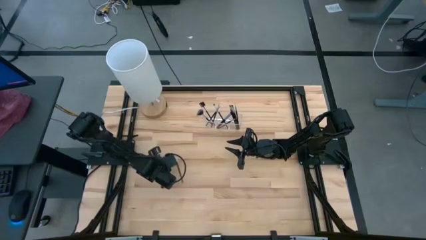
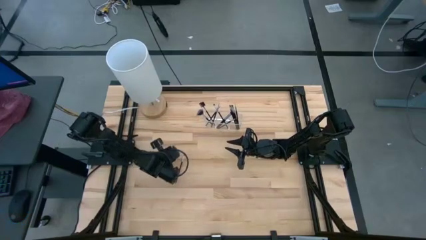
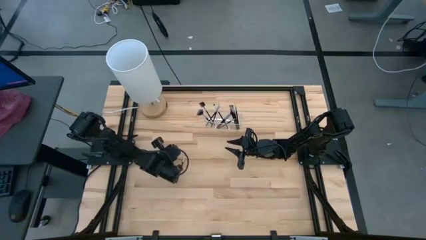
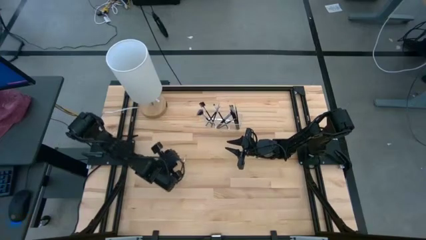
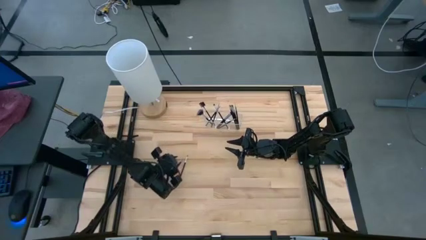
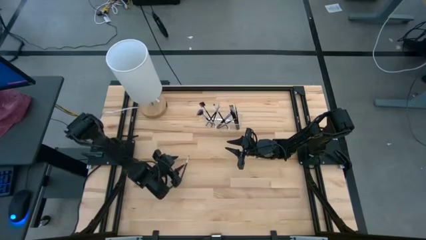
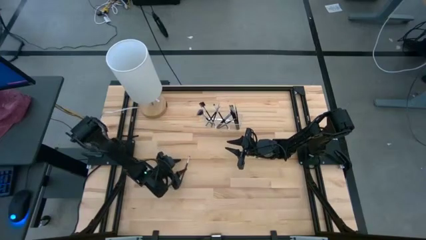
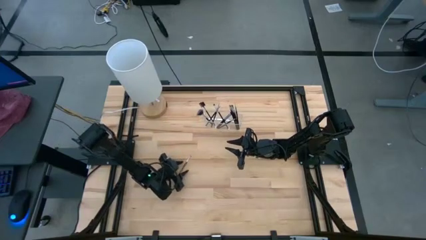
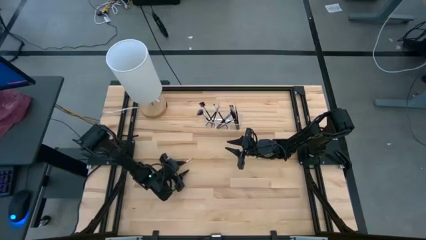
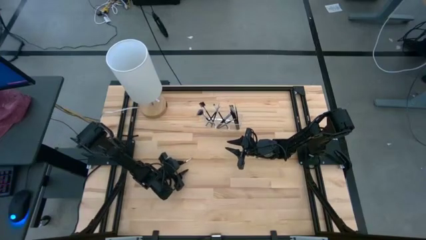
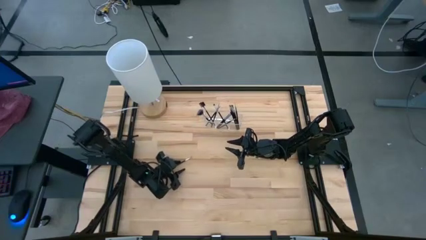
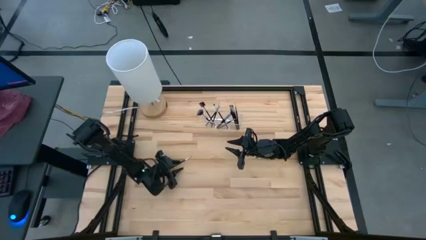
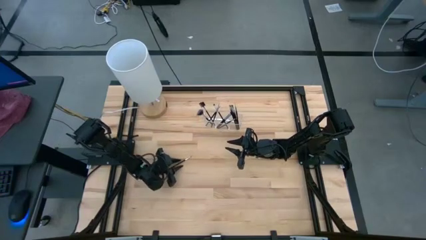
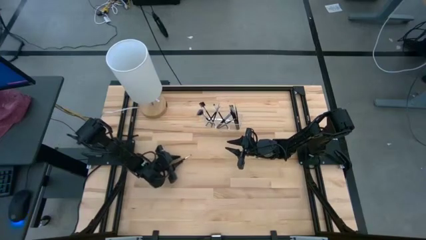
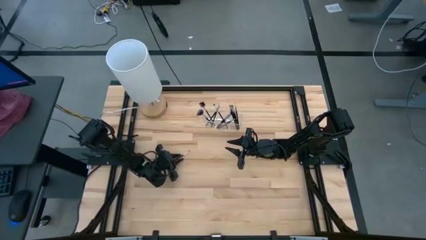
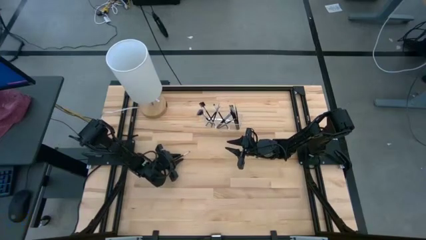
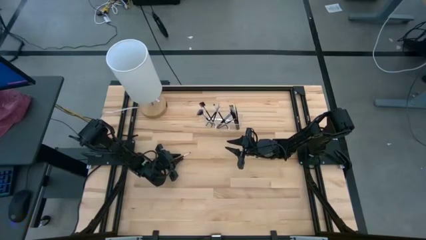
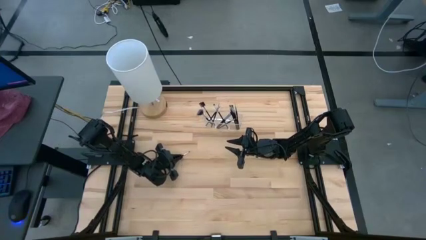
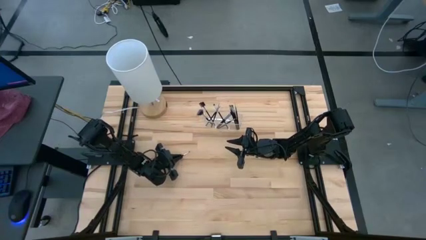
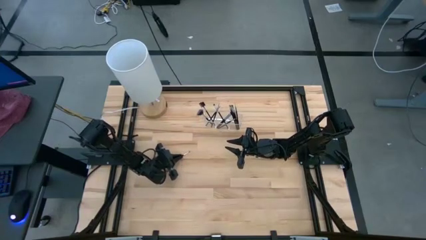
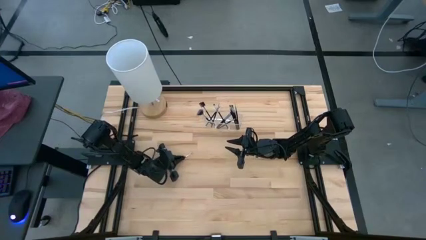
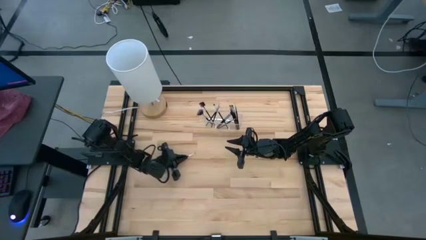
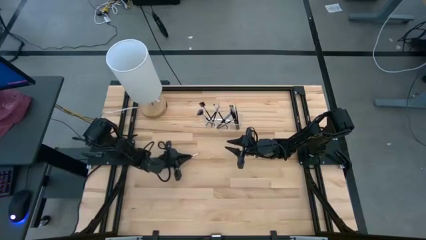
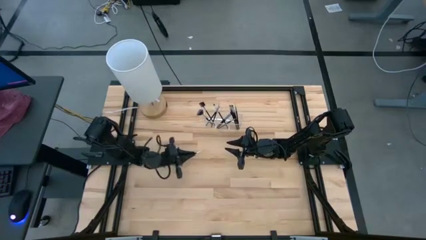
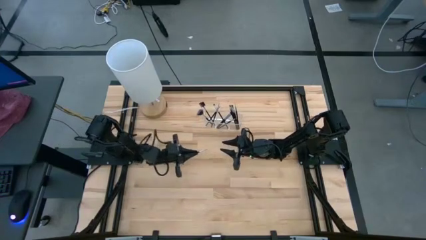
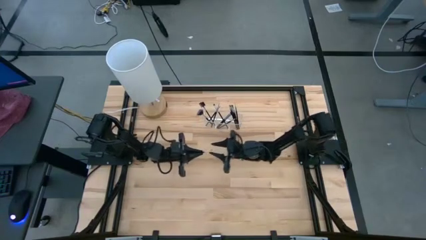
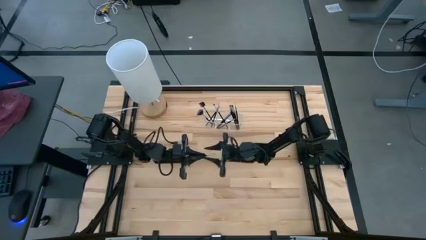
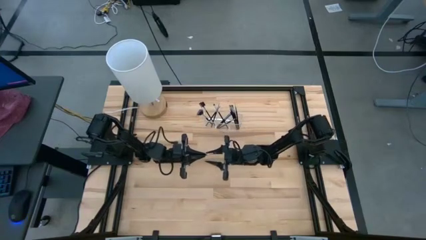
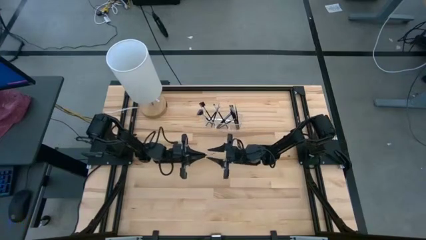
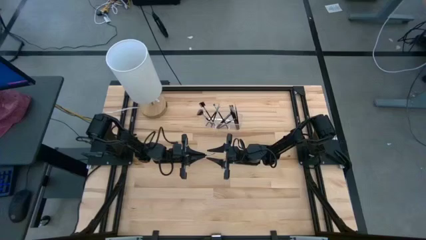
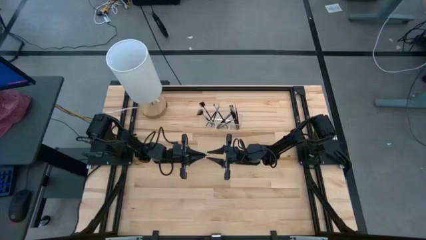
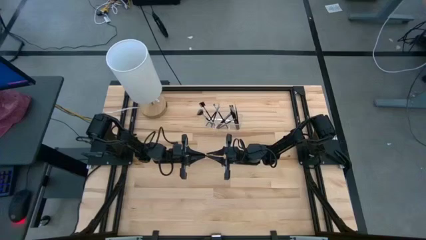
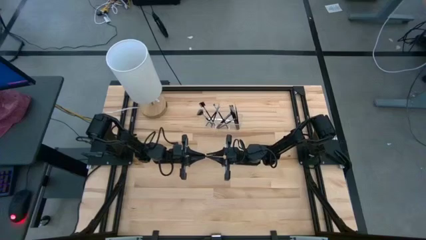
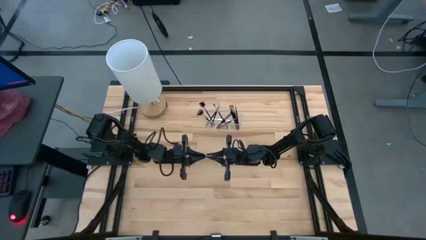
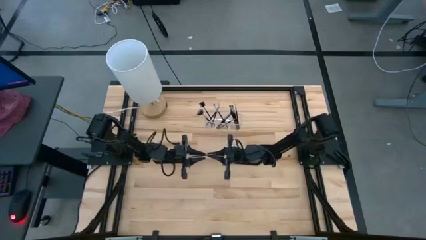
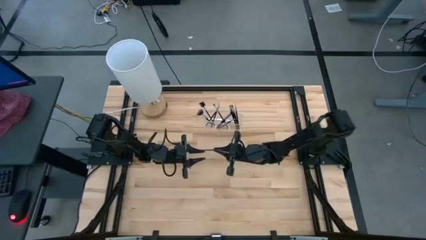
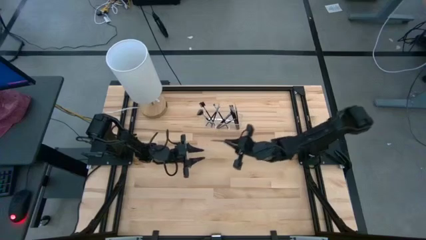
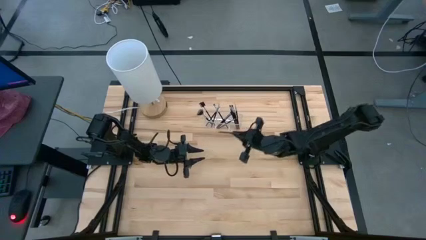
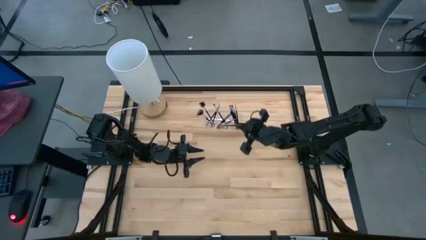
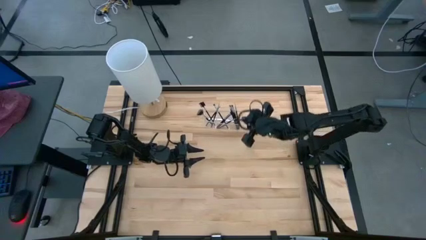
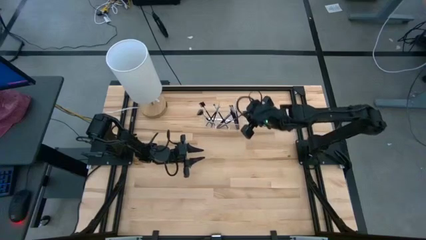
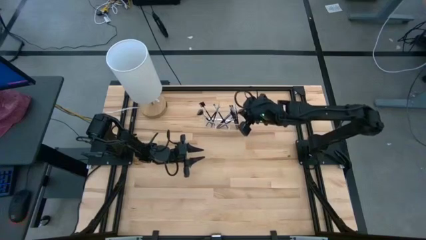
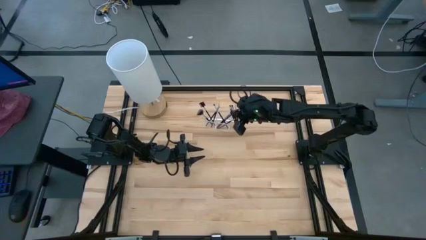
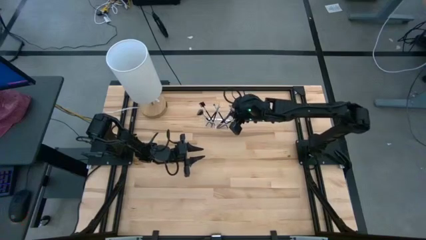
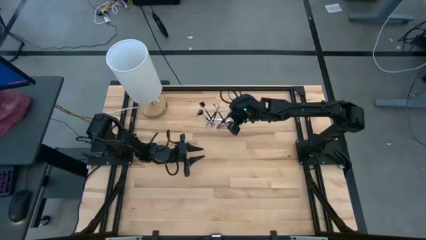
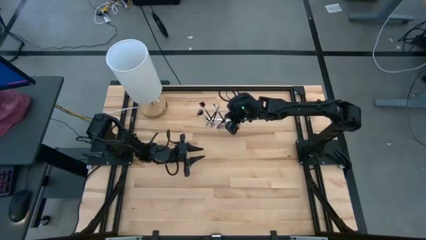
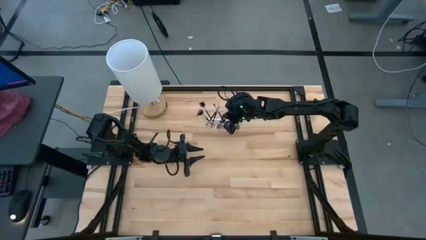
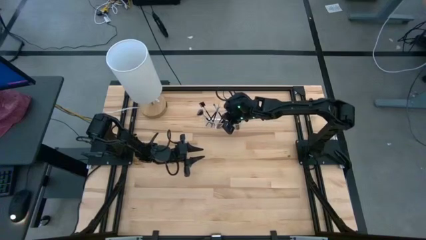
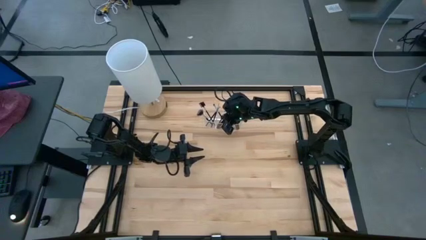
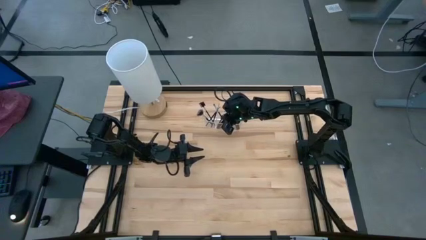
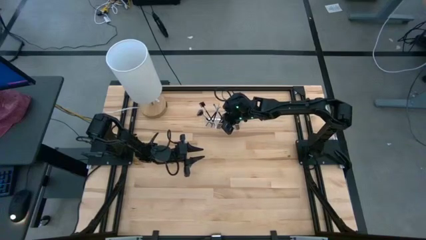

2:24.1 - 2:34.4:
Task: Put items in baskets/containers
Put the black liner brush into the transparent organizer

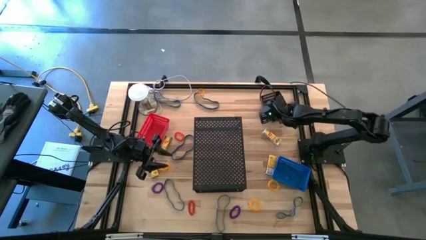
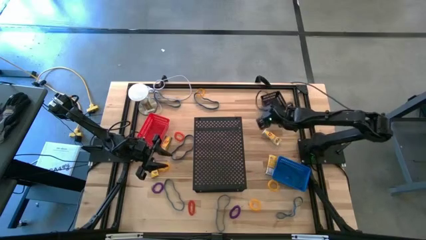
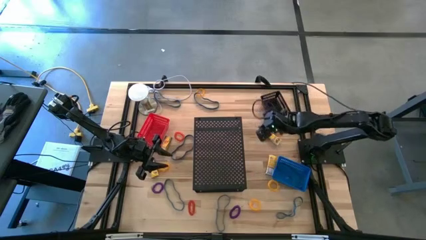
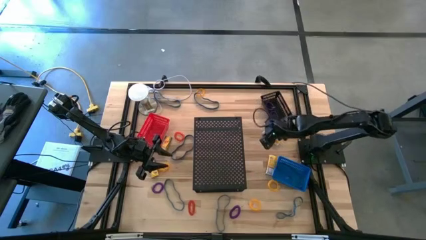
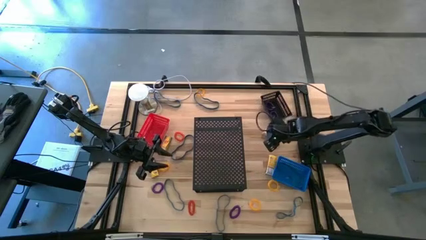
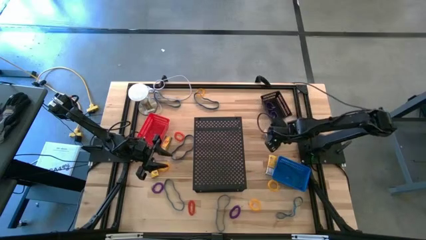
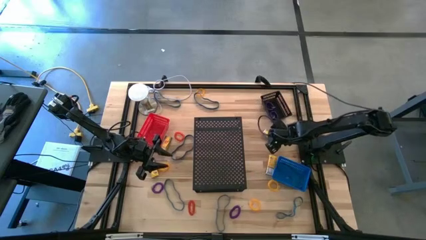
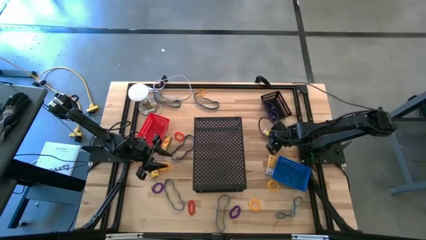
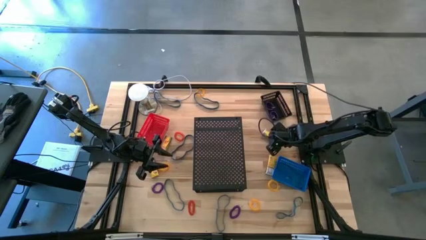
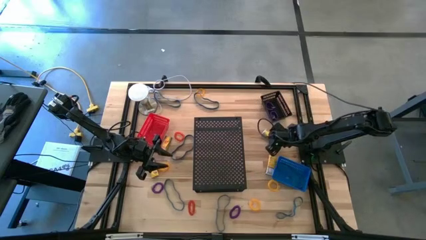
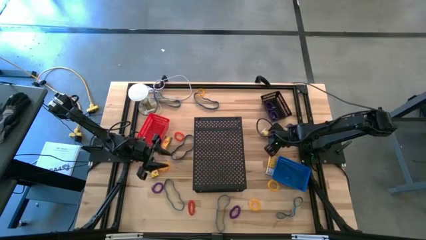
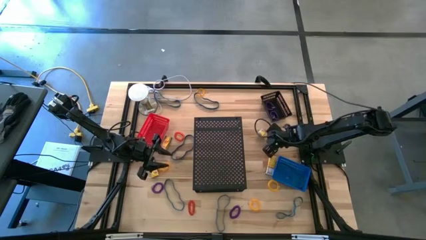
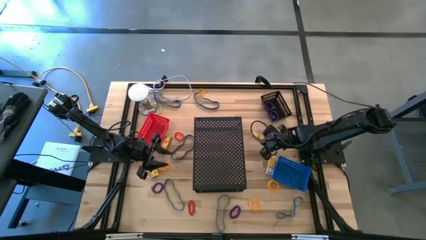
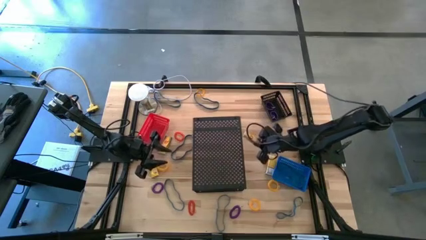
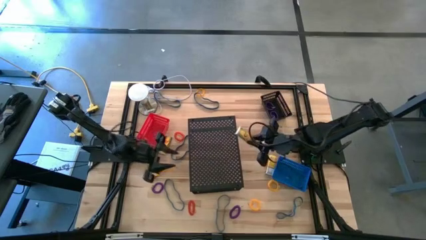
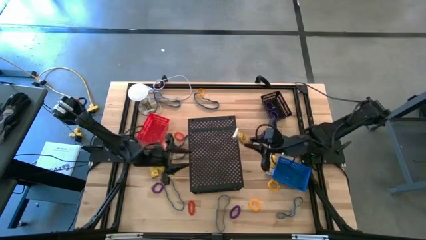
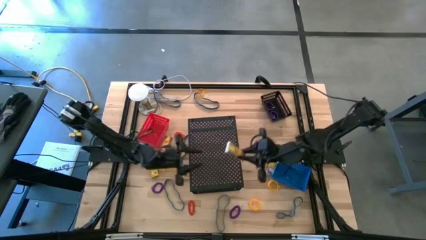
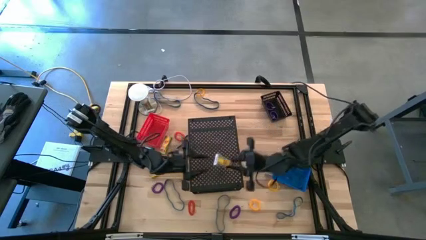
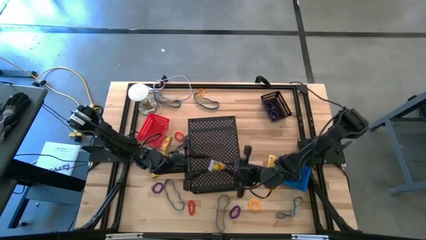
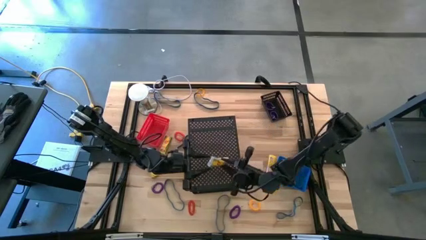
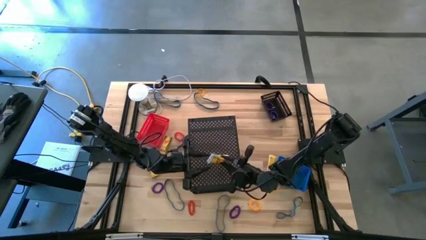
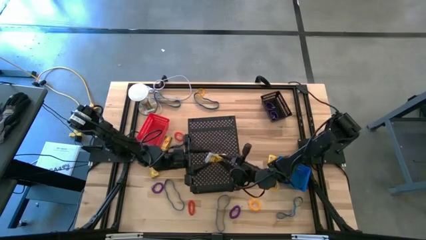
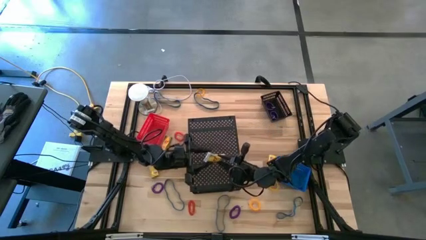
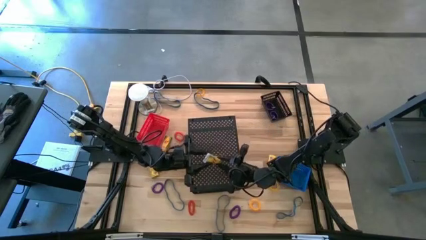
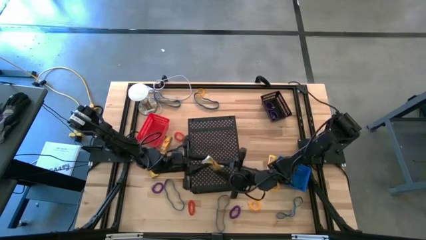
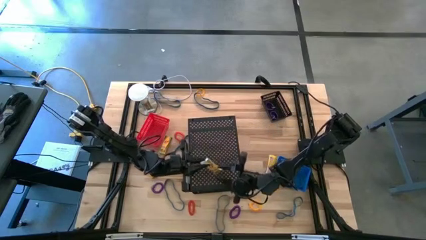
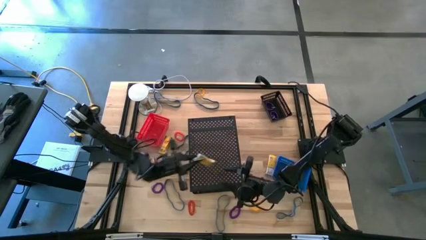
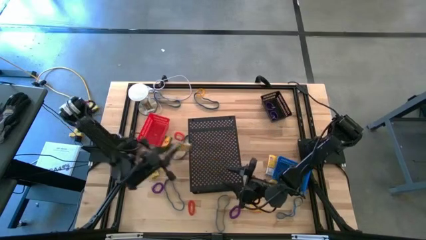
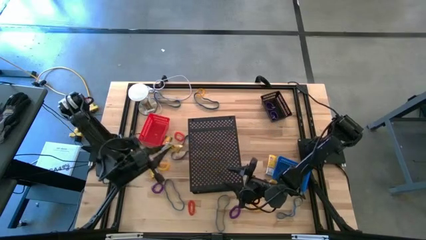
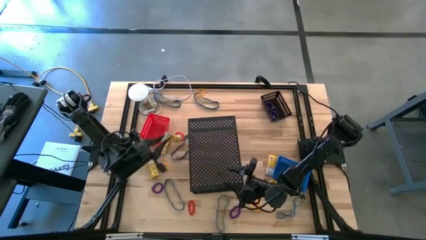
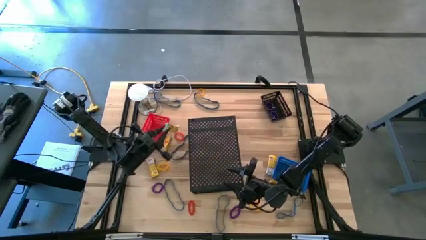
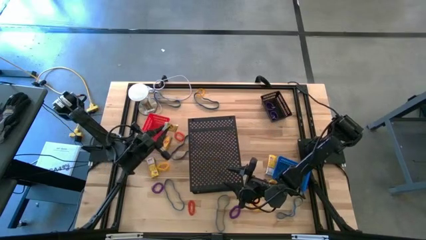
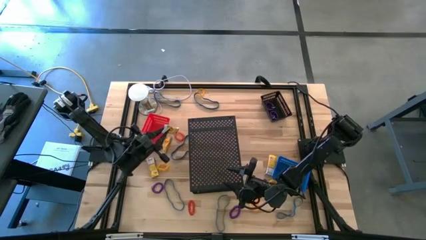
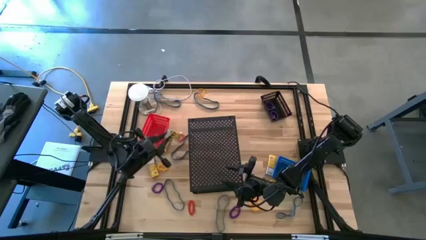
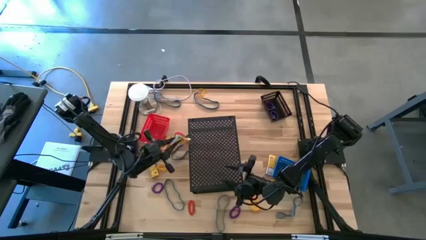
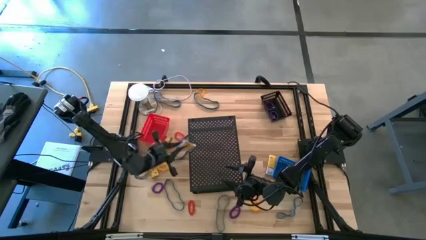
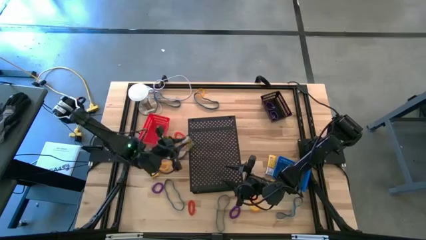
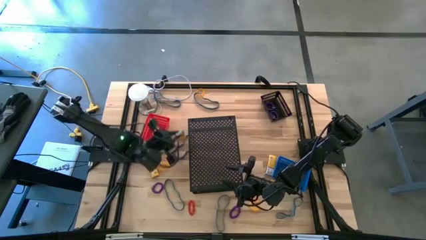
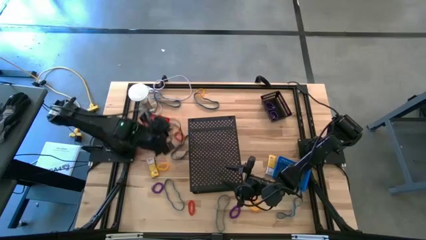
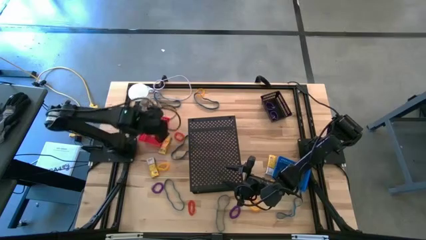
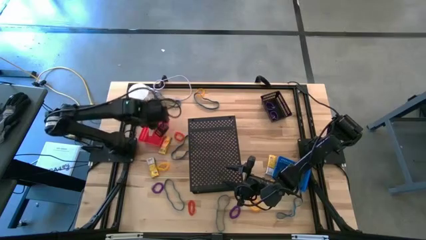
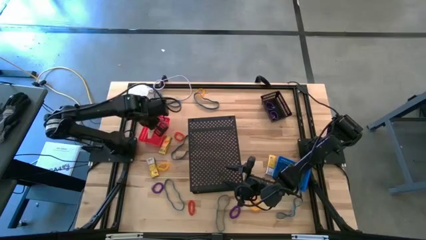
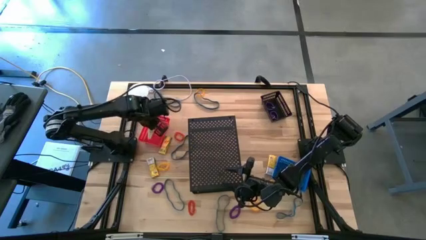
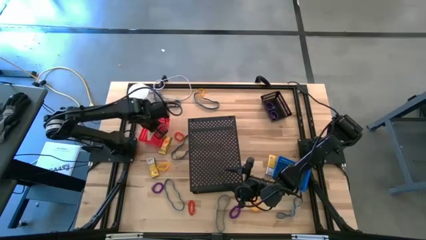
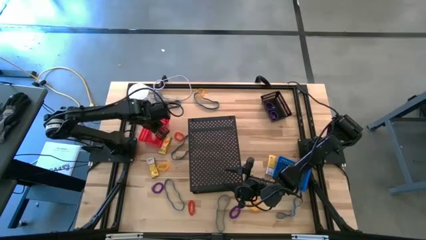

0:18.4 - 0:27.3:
Task: Pick & Place Office Desk Supplies
Put the yellow crayon box into the red bin
